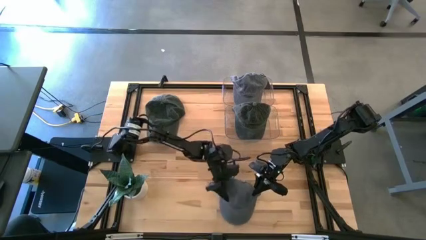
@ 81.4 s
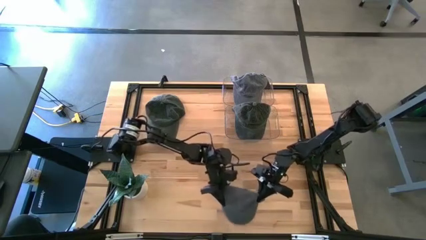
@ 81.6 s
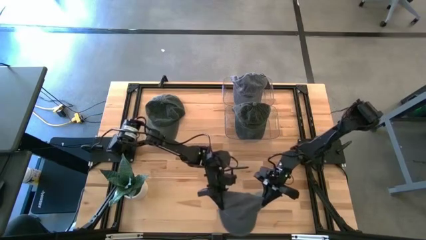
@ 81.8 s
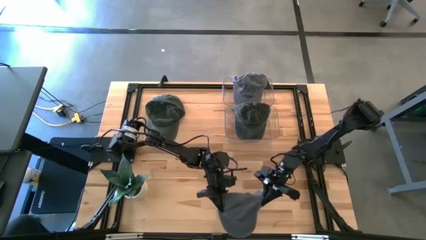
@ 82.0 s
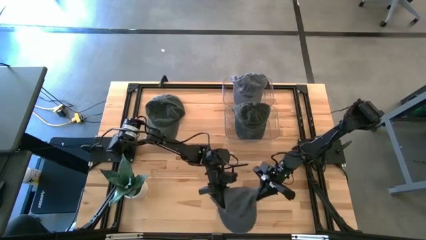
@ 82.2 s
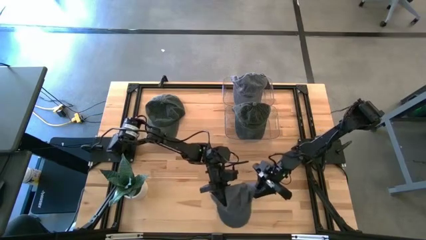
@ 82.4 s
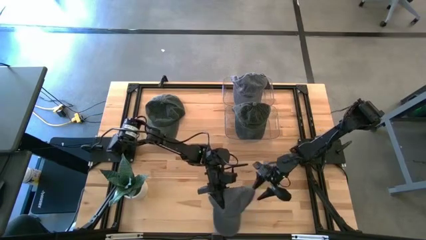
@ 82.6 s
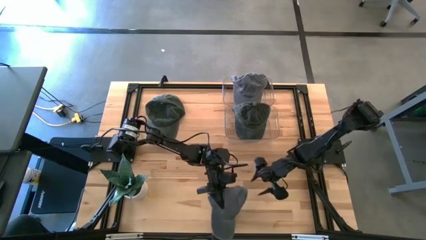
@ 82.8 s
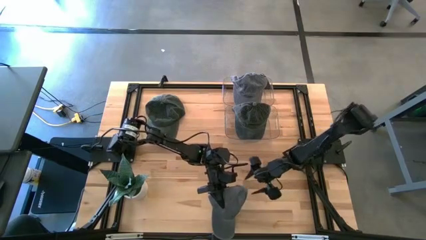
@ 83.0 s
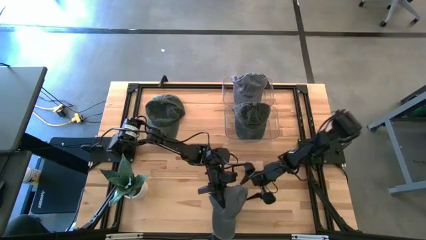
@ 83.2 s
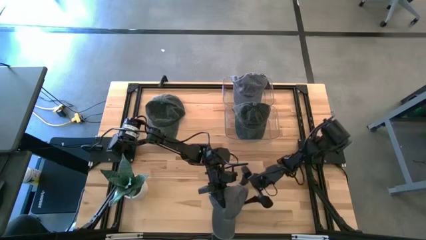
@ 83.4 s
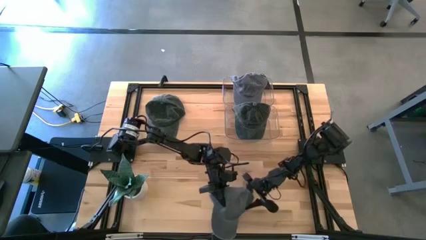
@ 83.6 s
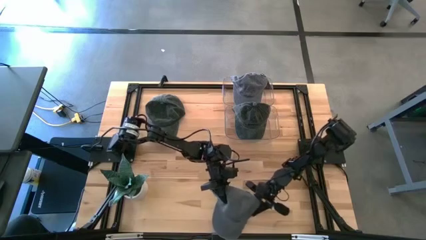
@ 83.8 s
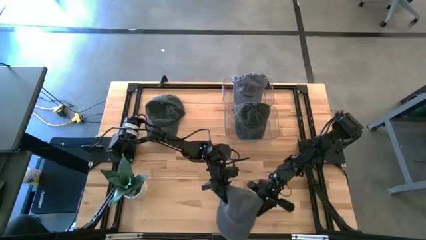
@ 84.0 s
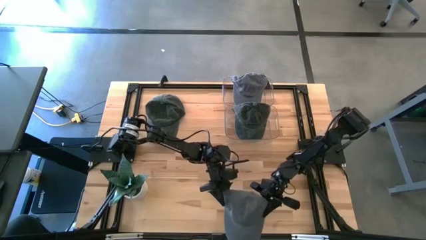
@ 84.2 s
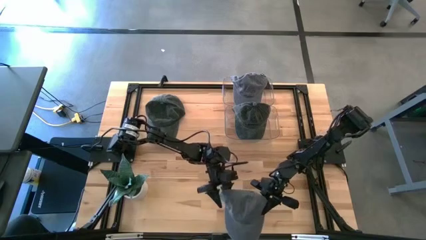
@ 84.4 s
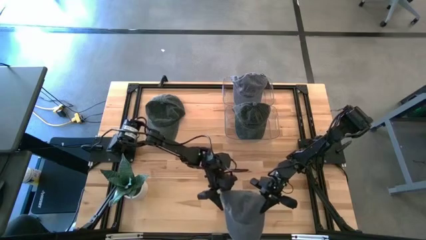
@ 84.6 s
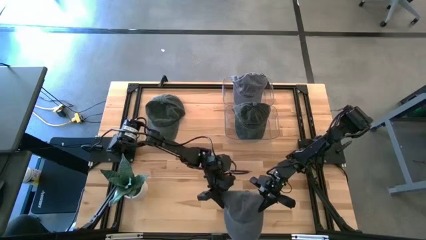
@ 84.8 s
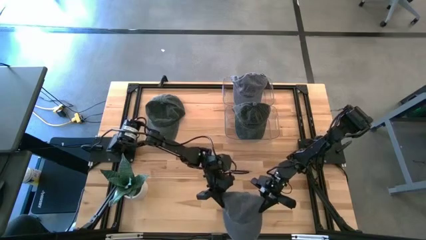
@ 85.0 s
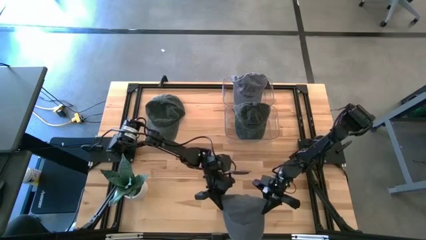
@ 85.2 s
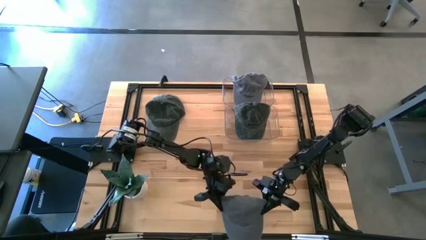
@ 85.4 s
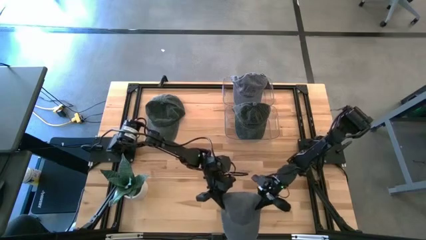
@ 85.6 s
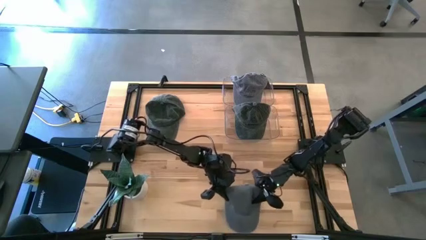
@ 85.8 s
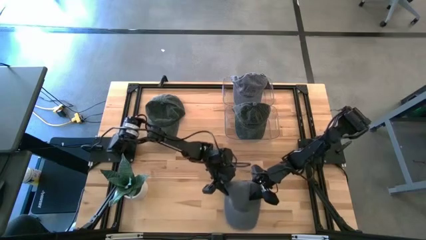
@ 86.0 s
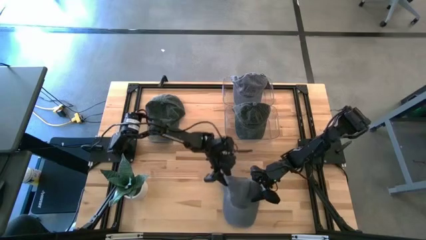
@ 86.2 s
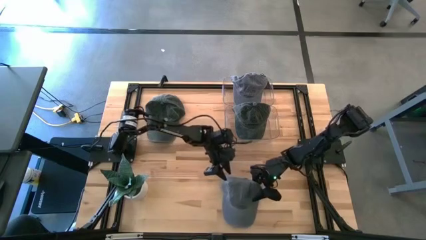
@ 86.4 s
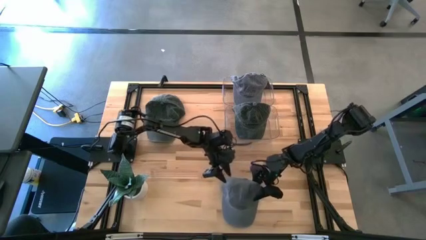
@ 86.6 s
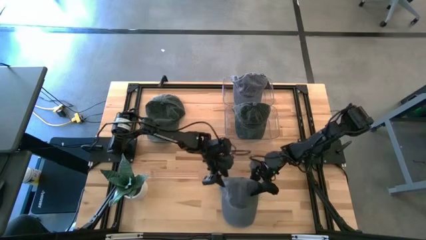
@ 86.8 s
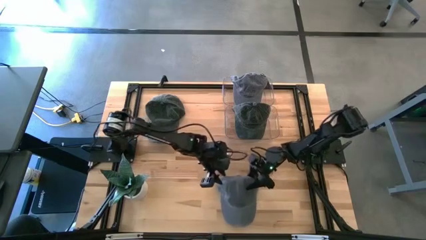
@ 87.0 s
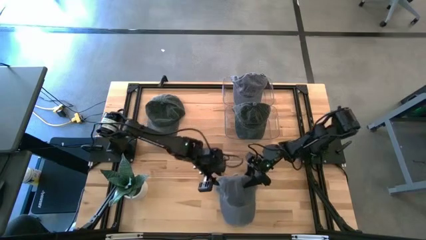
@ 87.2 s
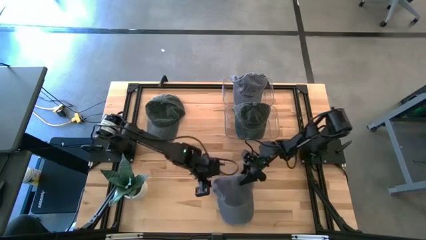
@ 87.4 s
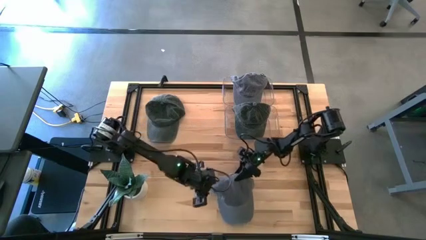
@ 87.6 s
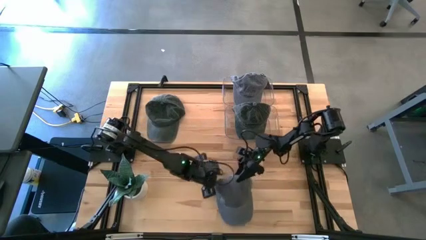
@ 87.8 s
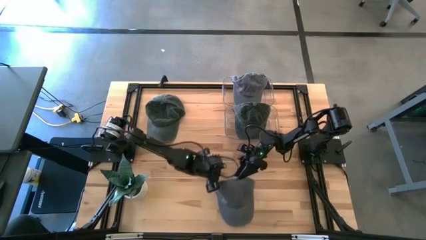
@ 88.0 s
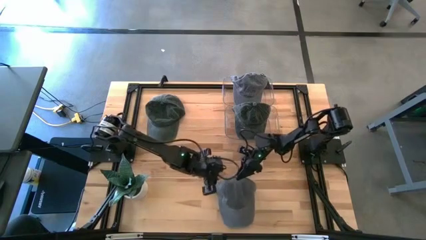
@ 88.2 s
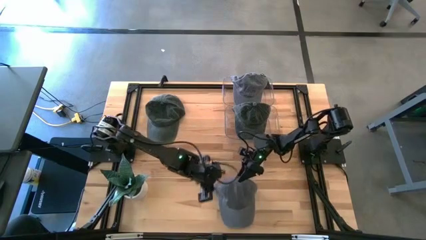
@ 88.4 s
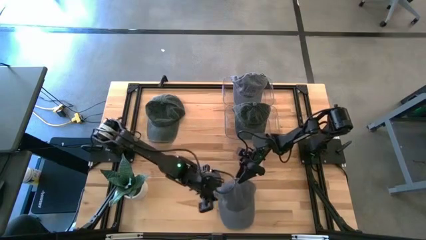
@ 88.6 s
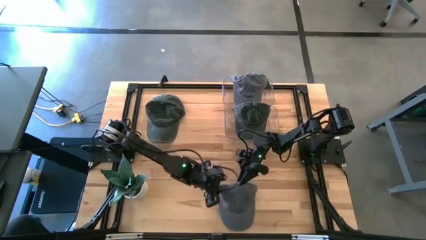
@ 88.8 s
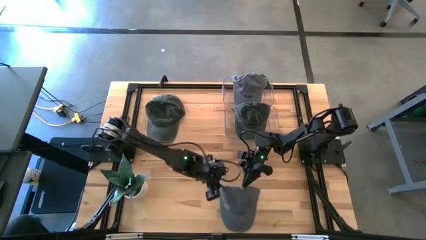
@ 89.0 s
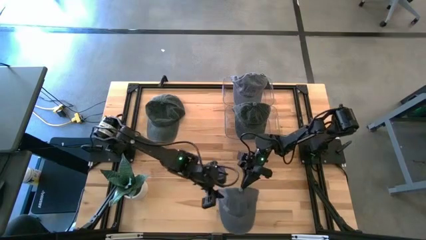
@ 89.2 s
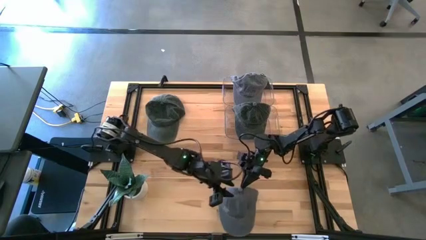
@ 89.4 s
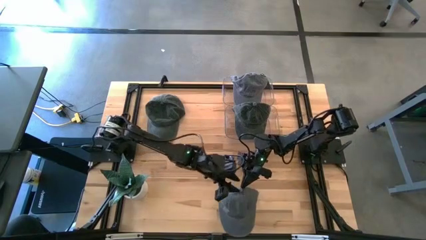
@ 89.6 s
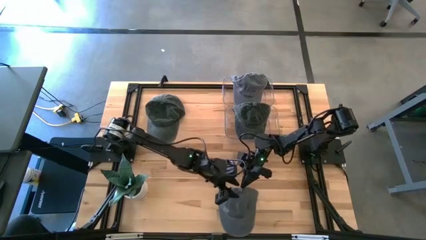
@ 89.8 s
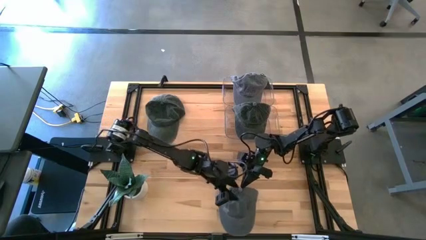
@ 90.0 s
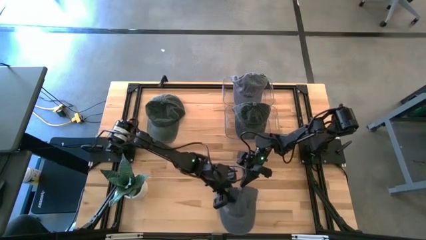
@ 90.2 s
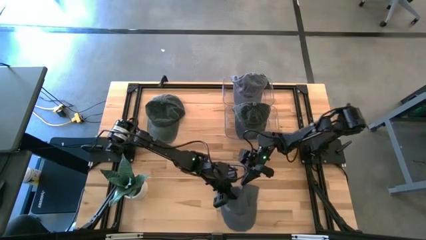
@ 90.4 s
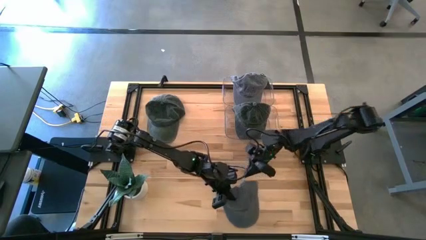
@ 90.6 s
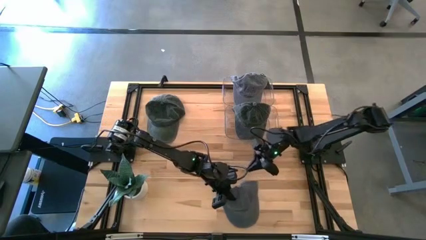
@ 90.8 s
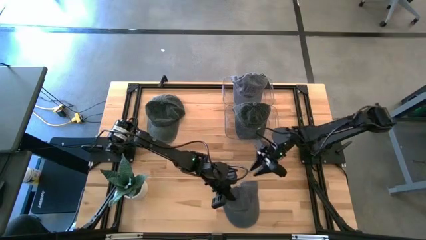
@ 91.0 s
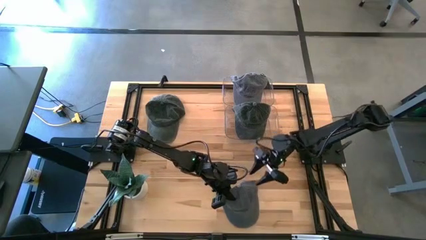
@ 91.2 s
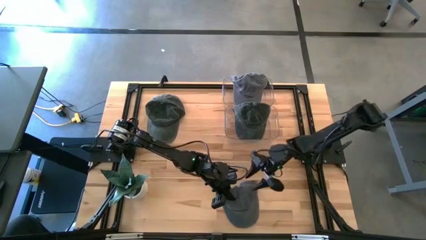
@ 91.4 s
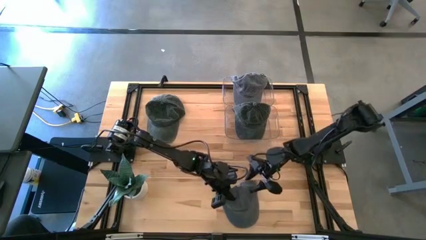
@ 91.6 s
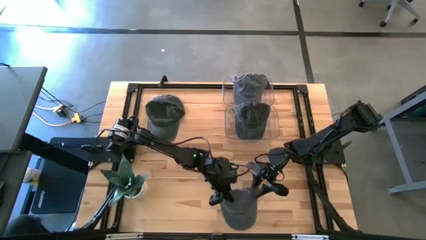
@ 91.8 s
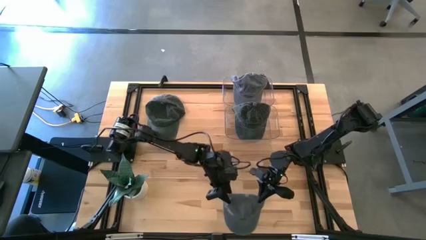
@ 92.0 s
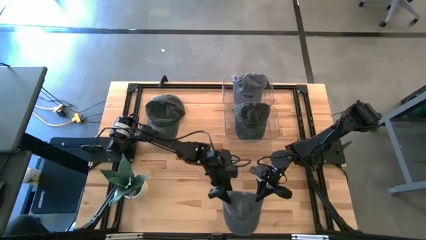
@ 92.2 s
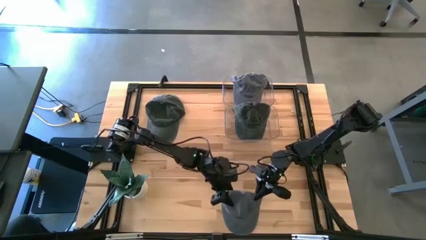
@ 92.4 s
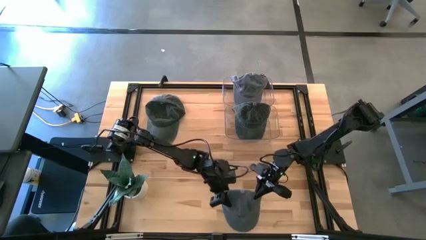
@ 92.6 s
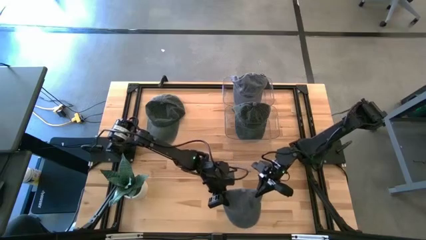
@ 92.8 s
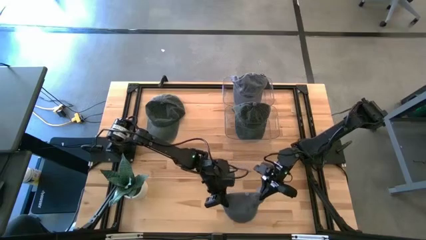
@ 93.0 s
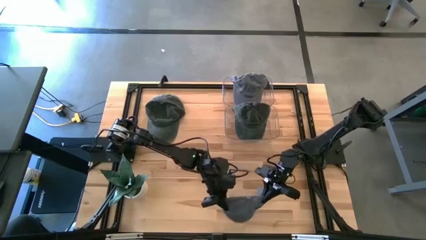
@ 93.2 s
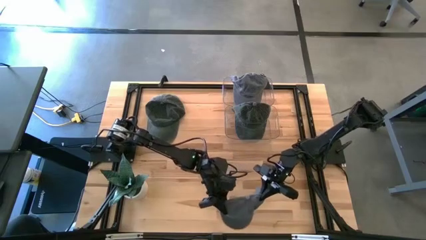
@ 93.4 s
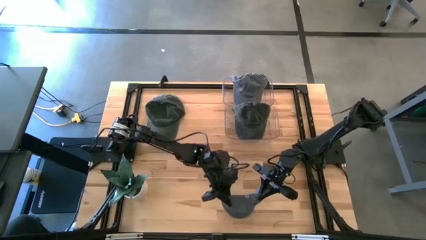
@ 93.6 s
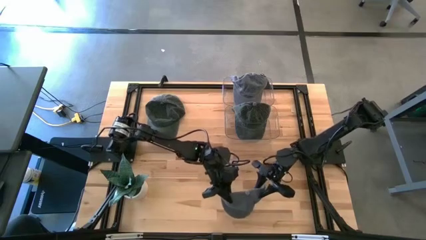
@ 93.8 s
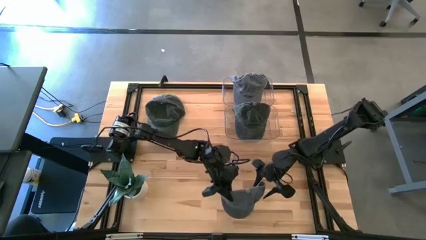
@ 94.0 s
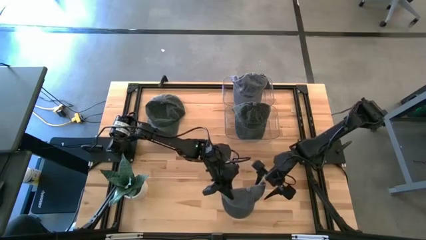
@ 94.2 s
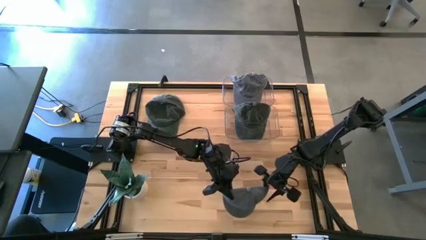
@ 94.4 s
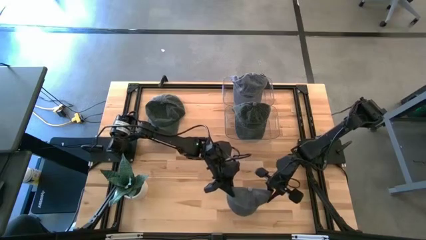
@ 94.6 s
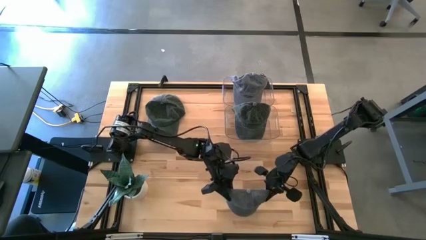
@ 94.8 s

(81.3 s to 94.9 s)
Task: Pick & Place hat
Put the gray cap into the top transparent bin

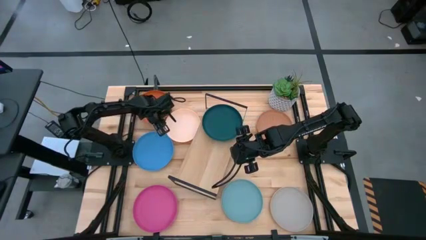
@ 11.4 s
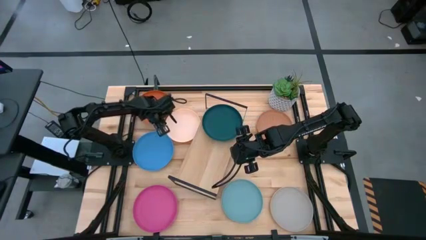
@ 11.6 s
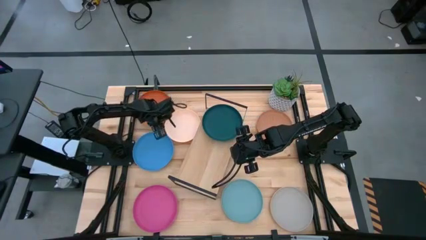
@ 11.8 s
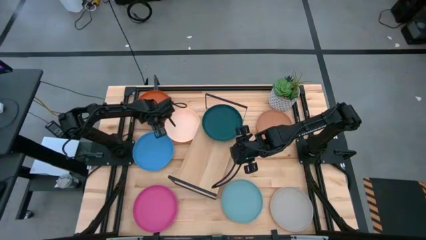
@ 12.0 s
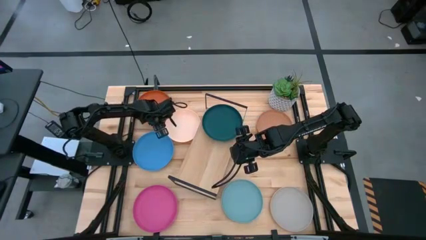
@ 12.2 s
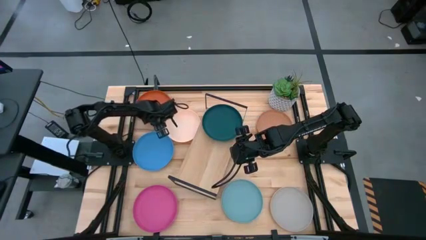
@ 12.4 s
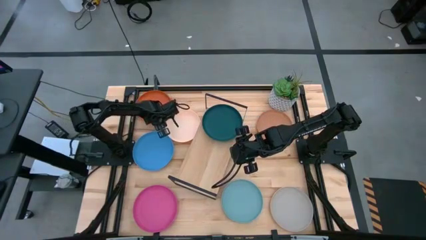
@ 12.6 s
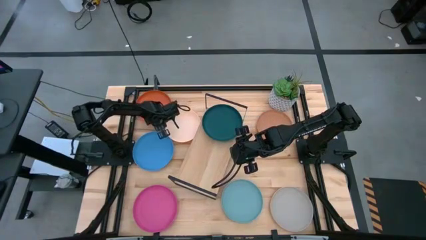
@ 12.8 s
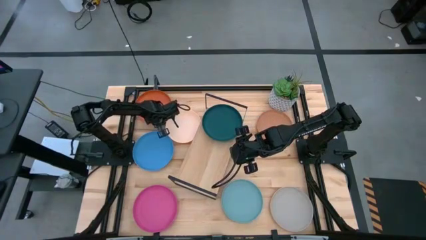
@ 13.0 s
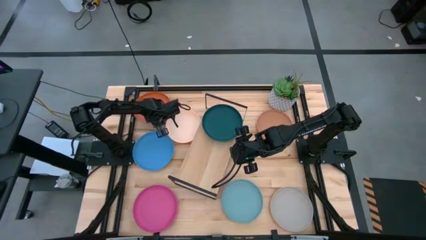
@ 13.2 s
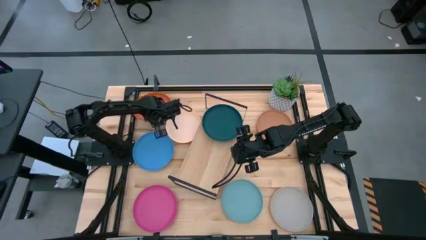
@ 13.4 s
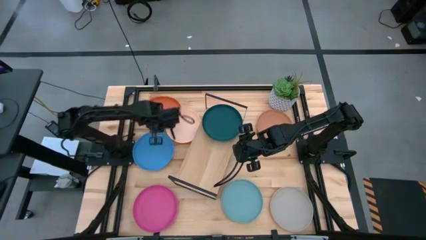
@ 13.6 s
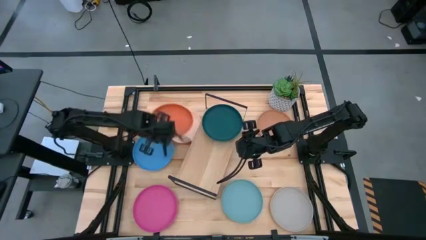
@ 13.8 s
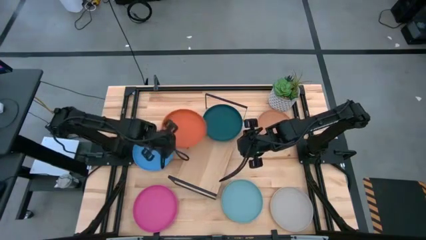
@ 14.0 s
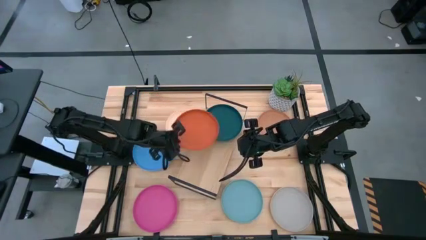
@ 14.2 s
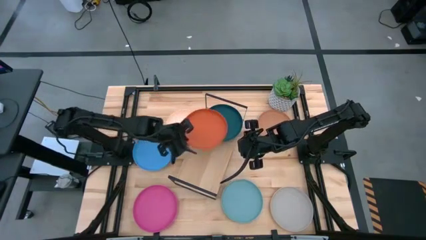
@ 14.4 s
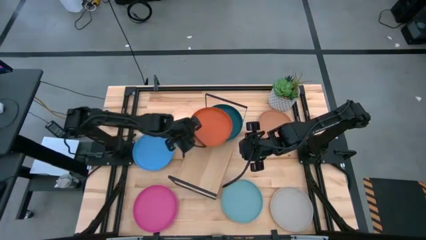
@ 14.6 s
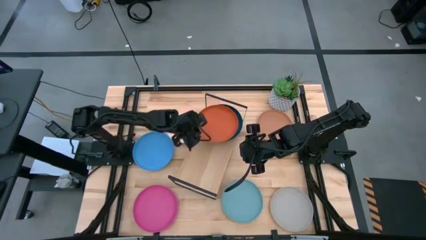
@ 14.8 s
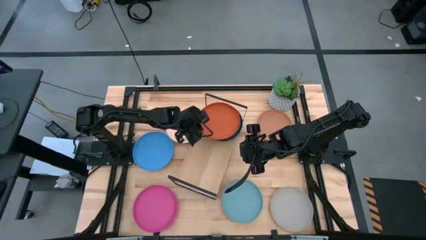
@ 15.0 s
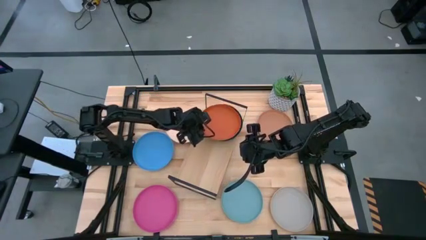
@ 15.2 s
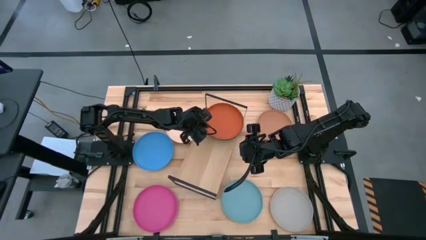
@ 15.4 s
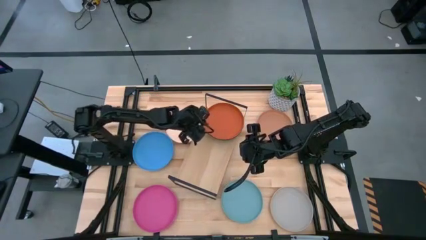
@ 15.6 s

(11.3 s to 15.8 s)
Task: Place and stack plates onto a shelf
Stack the orange plate on top of the dark green plate on the shelf
